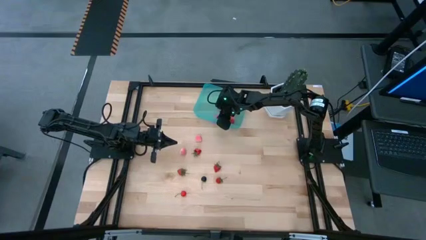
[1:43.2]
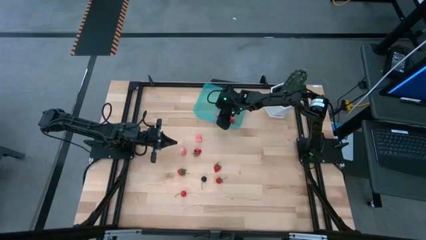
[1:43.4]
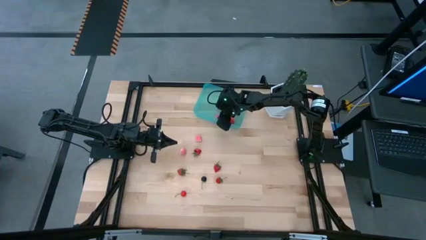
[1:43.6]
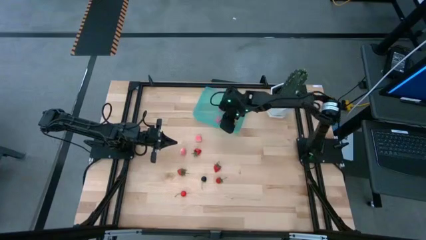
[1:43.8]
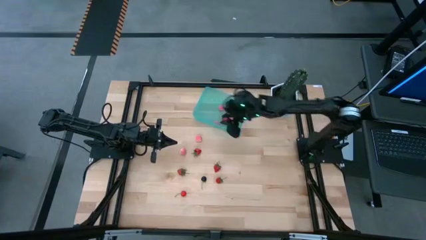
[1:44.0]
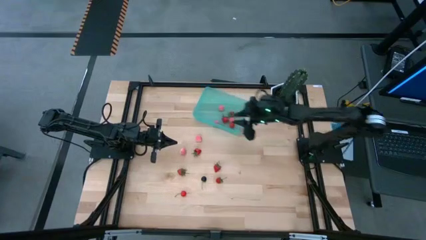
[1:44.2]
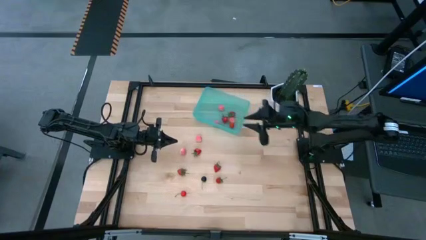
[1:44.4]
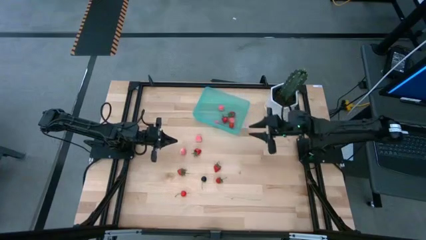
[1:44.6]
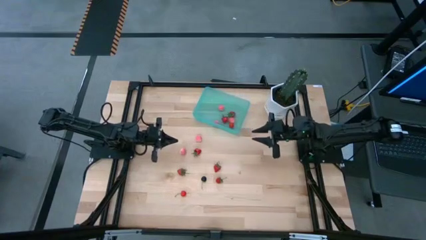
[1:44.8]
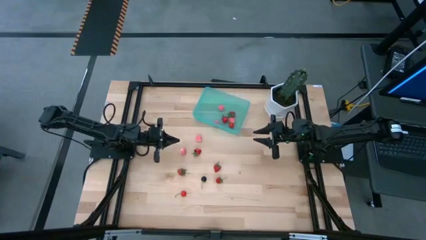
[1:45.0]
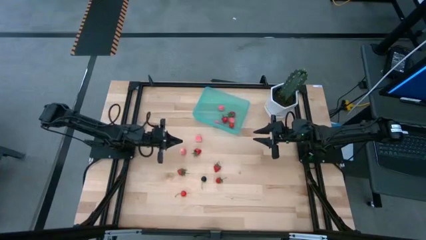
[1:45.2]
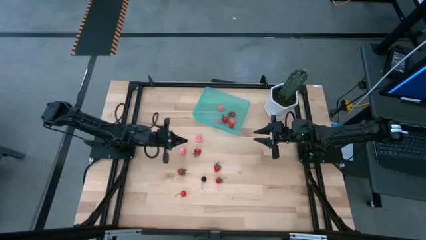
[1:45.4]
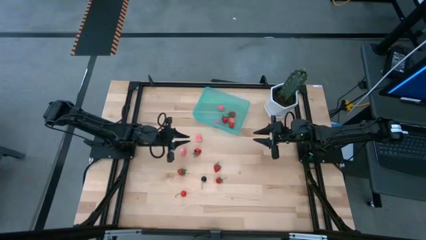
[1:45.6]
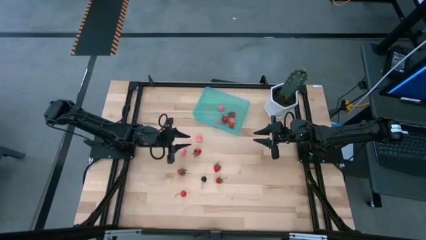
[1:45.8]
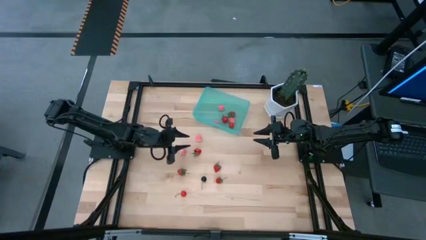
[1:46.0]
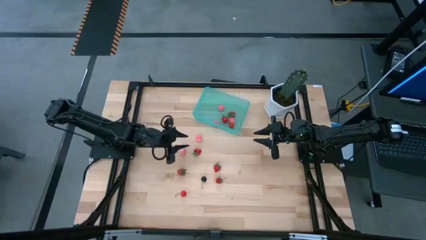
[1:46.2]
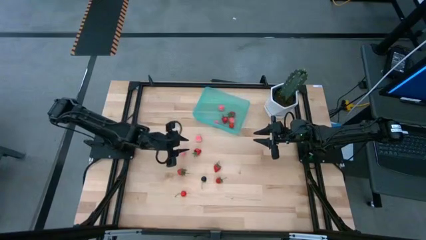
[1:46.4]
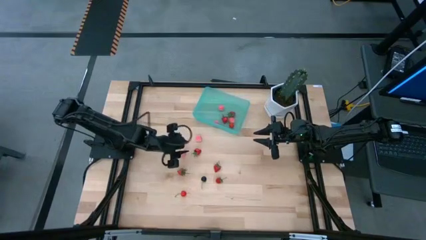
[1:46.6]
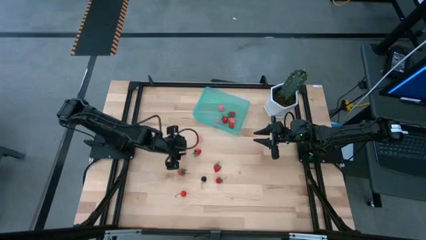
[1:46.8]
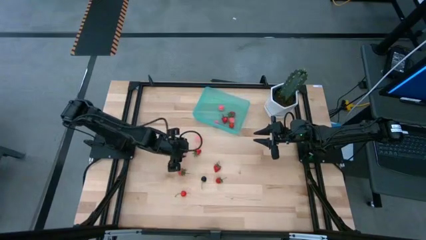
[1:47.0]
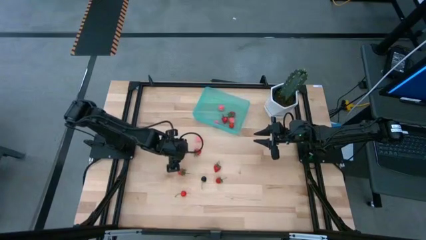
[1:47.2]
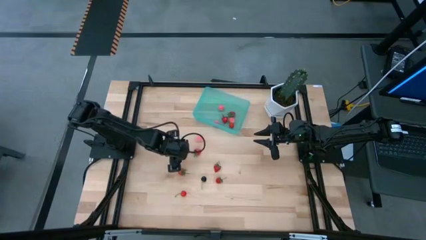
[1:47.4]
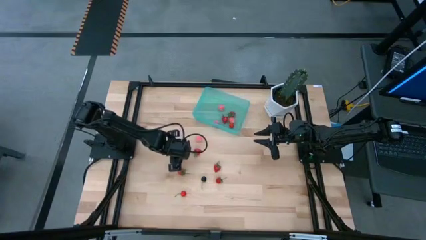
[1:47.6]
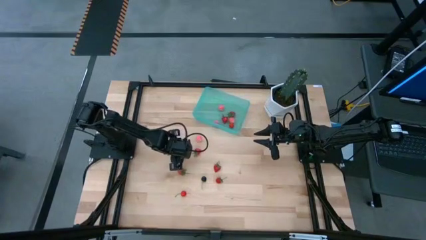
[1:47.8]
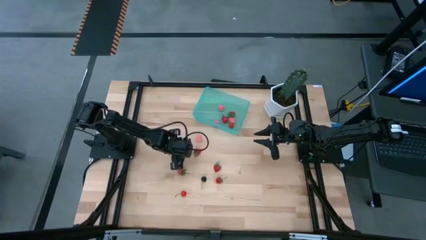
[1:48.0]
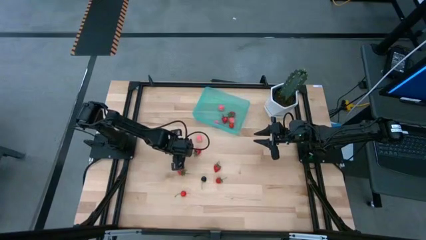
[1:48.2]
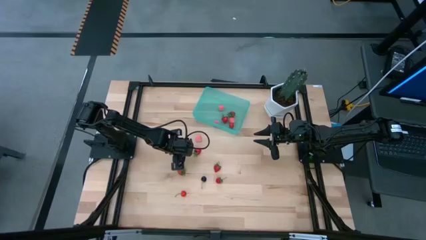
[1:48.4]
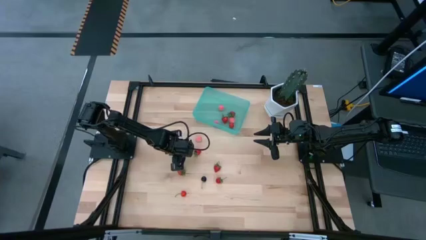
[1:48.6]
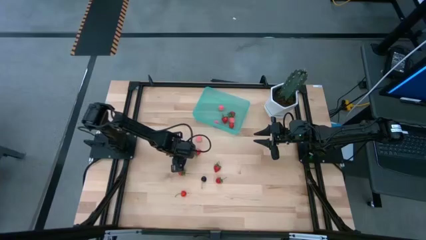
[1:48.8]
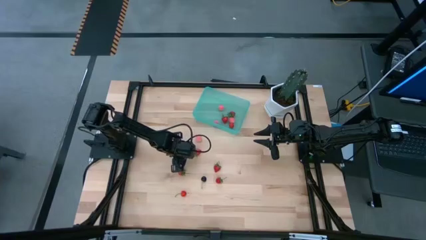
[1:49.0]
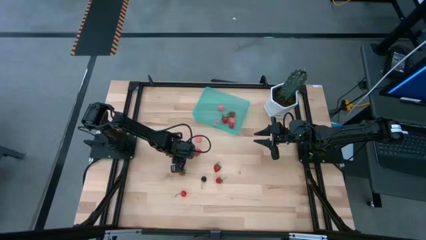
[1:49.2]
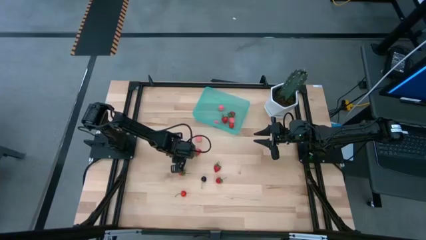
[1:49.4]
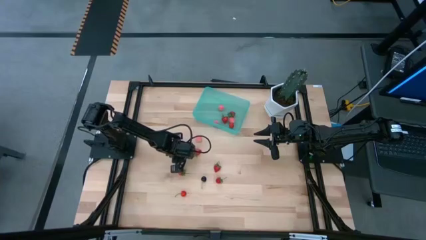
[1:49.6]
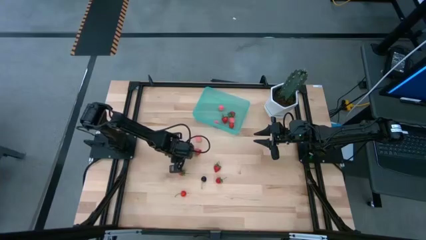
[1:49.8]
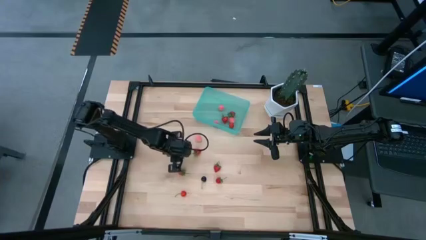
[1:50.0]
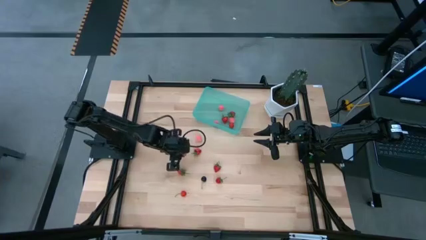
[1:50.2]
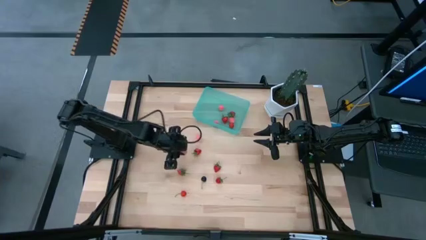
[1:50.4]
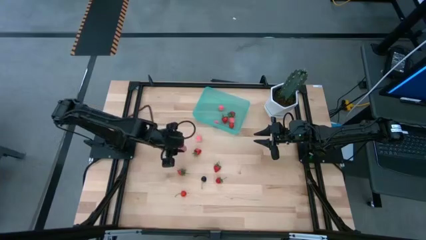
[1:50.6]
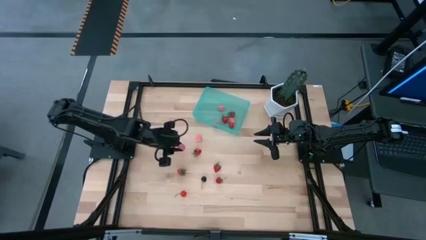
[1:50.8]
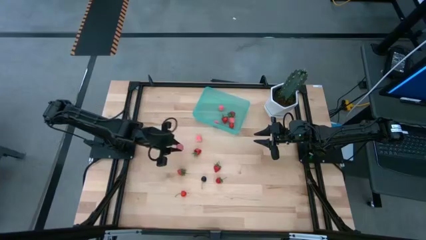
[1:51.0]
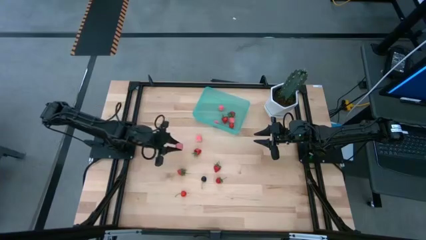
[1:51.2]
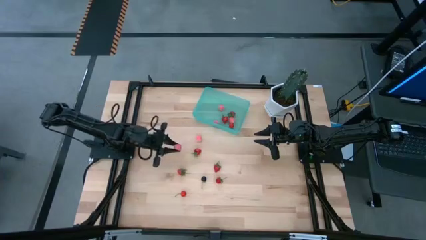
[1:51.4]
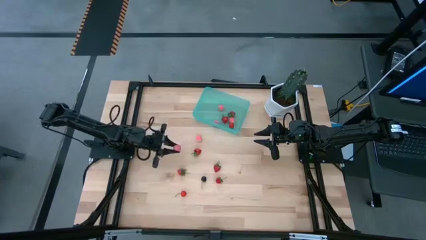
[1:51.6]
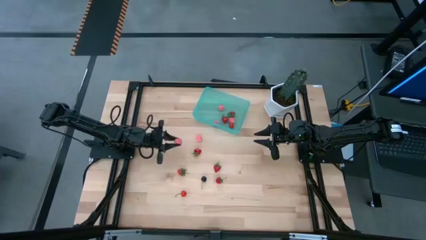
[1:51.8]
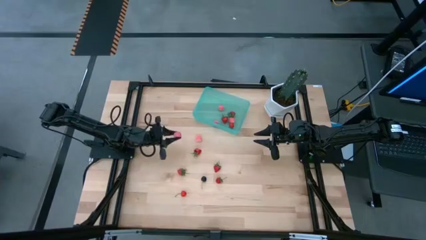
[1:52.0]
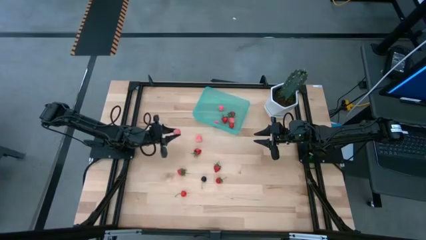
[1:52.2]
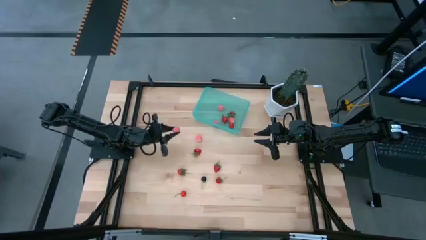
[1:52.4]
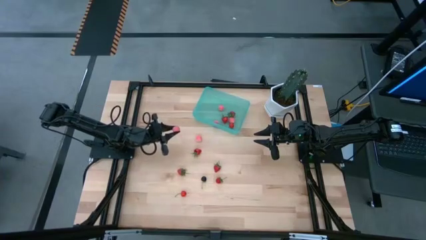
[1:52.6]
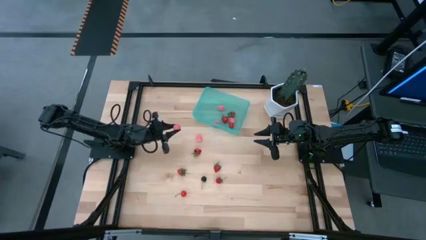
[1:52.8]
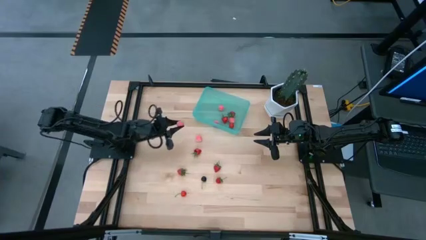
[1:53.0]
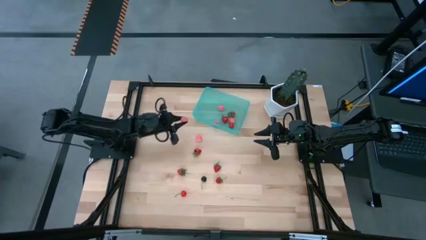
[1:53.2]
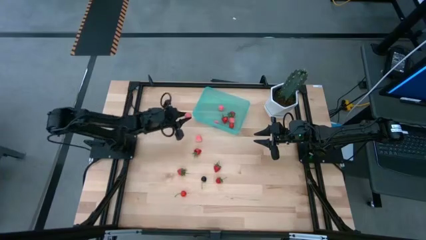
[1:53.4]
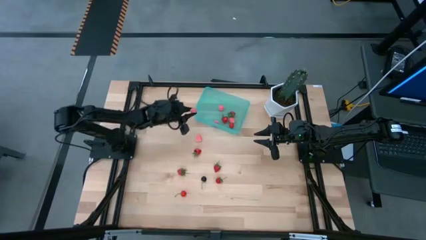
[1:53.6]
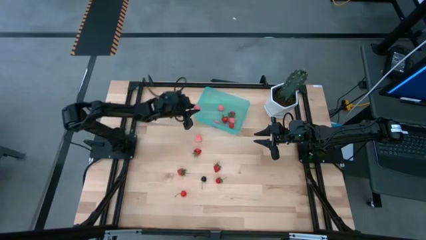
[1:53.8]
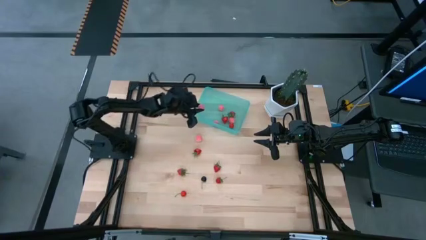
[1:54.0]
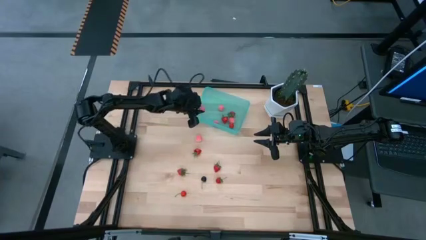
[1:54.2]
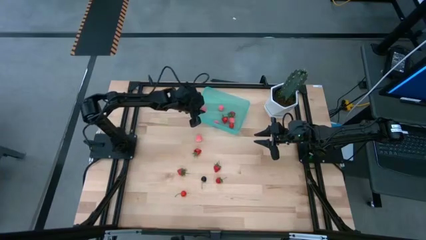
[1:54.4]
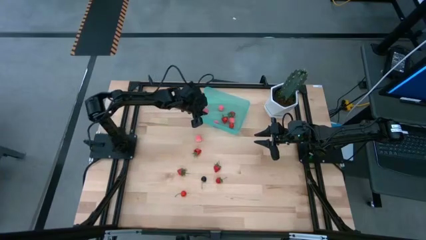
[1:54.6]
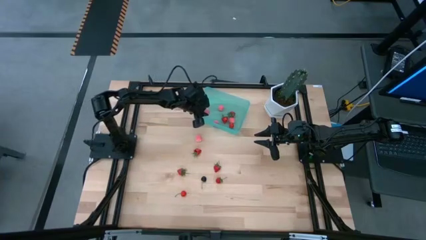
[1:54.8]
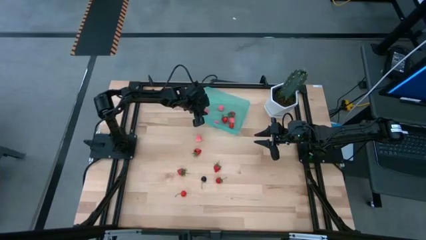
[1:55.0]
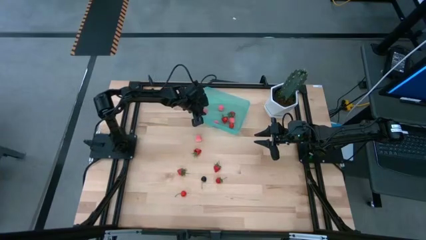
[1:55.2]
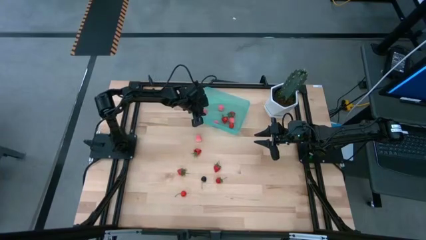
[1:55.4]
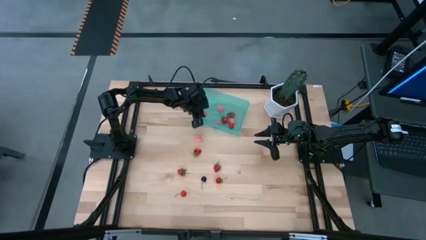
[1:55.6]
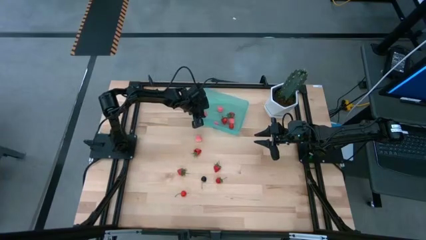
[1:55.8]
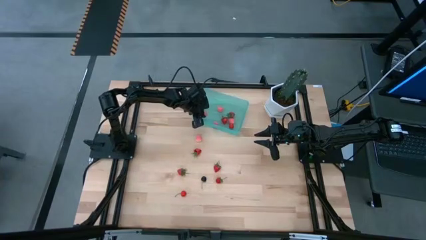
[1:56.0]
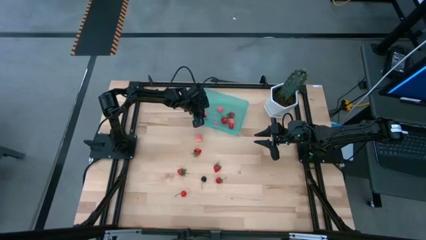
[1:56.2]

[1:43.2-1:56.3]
Task: Pick and placing Produce into tupperware
Put the pink peach into the light blue bin

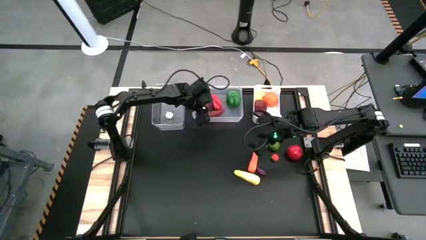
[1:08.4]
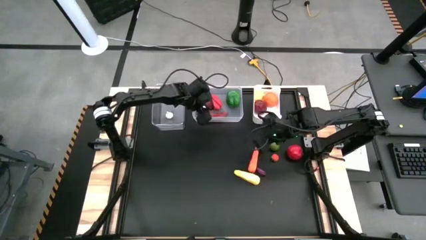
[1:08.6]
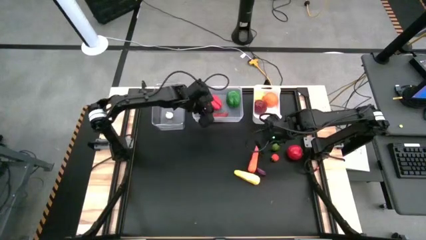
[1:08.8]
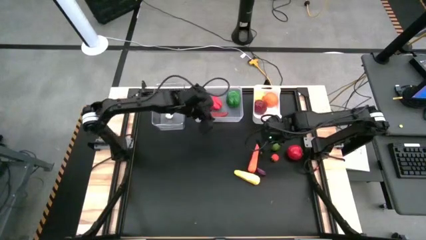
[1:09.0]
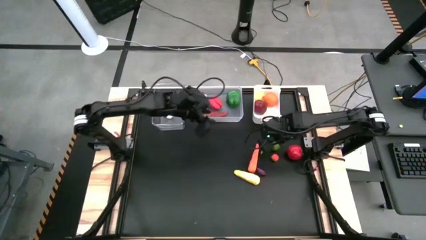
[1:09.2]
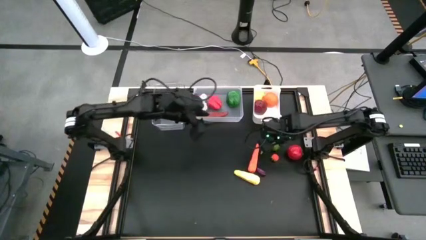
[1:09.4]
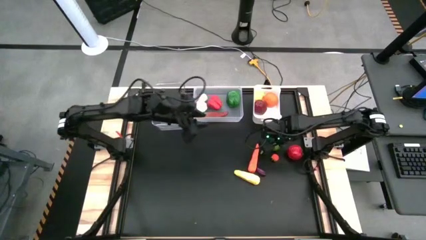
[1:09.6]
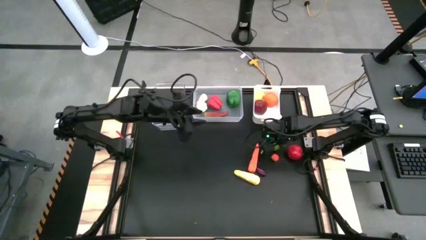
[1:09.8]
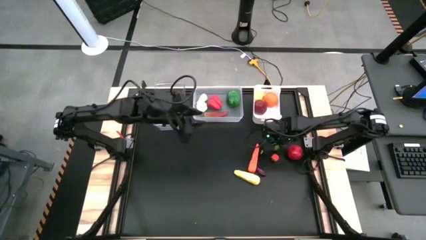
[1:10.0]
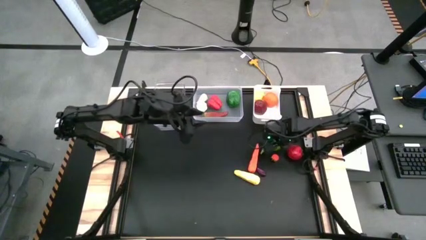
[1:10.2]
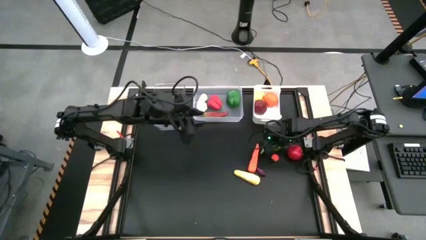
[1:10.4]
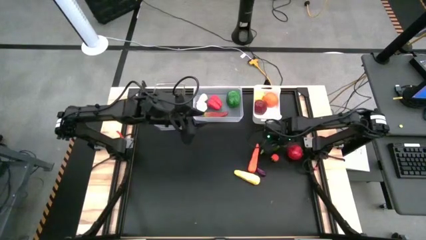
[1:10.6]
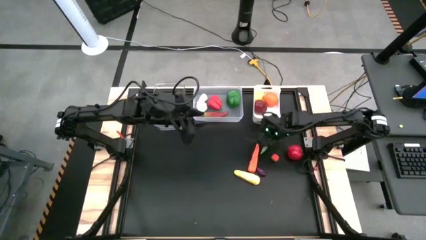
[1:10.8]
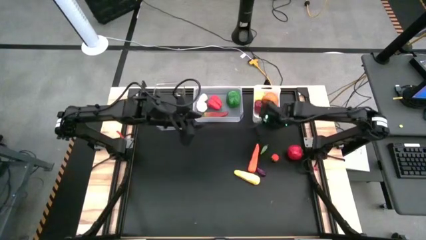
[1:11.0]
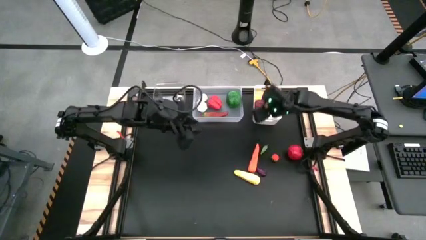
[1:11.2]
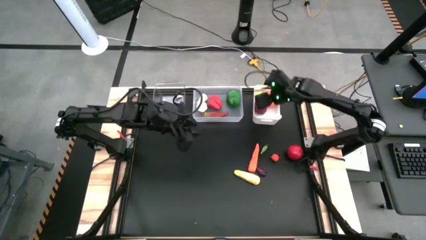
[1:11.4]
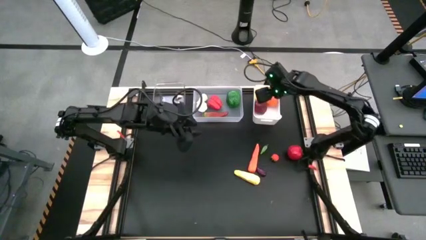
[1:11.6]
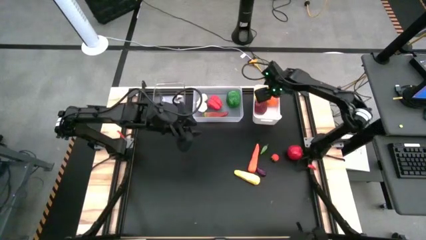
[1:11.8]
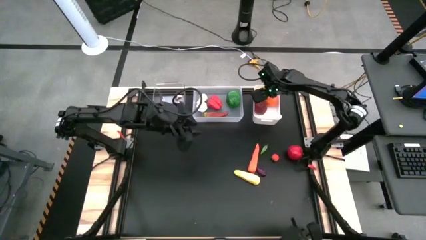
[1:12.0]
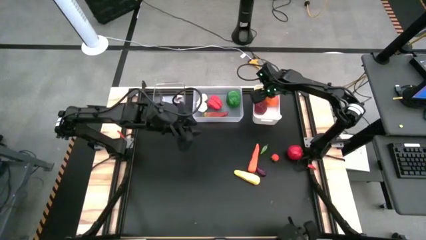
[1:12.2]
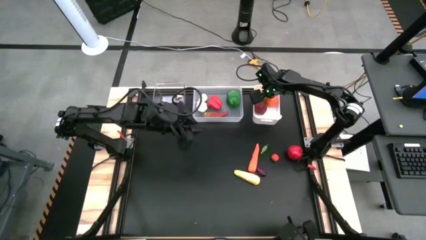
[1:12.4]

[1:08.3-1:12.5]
Task: Sort produce into baskets
Put the green lime into the white bin
